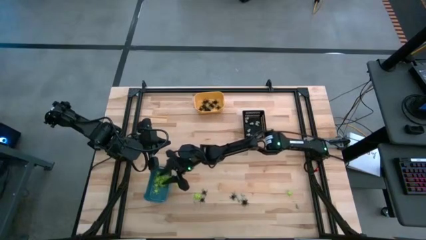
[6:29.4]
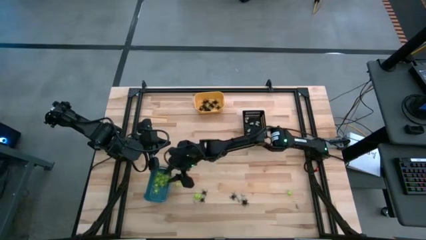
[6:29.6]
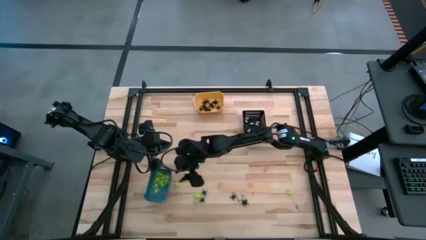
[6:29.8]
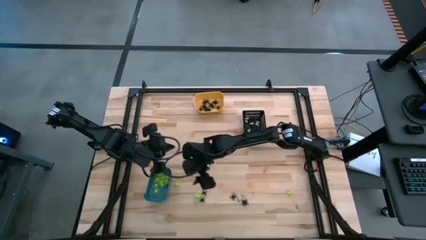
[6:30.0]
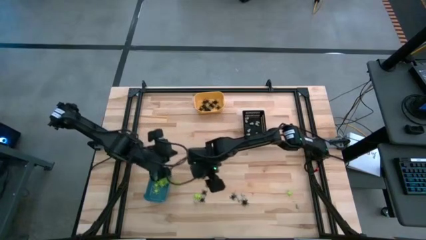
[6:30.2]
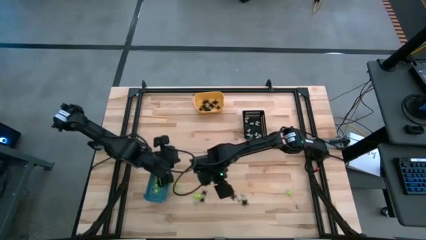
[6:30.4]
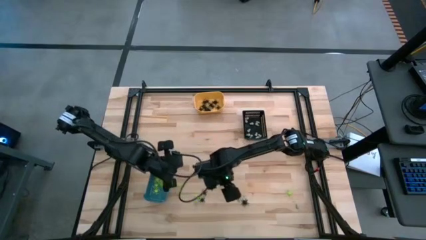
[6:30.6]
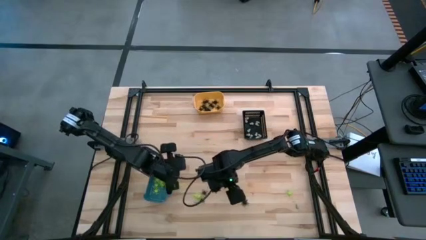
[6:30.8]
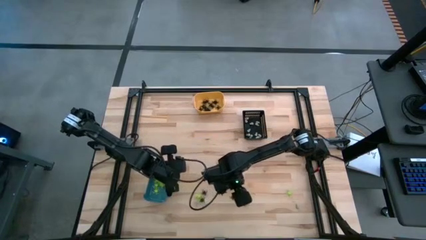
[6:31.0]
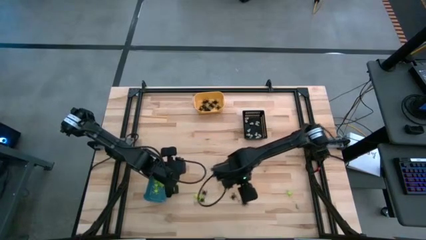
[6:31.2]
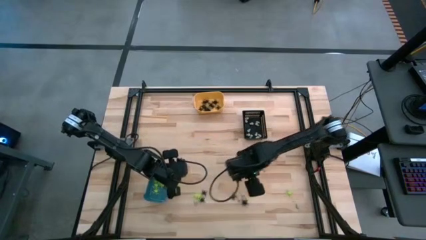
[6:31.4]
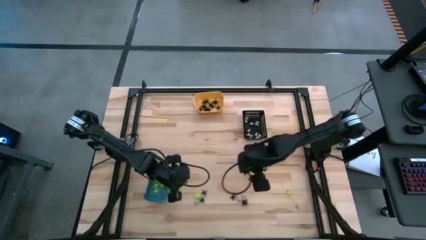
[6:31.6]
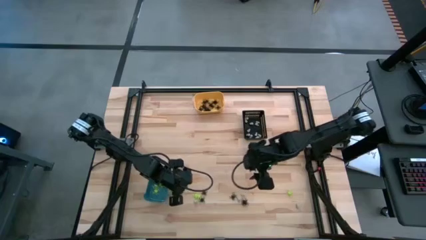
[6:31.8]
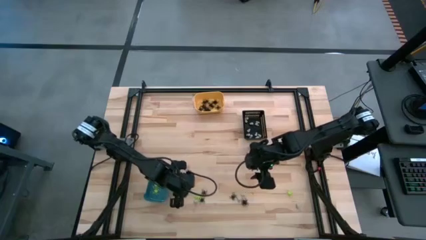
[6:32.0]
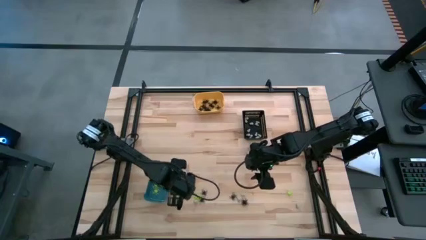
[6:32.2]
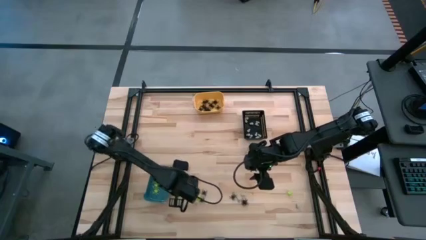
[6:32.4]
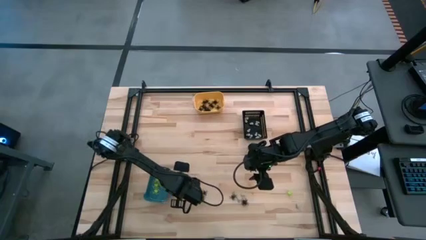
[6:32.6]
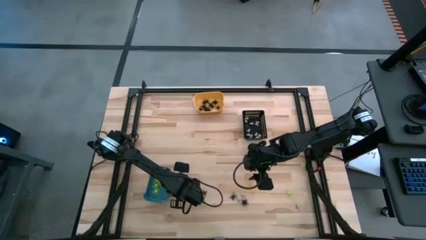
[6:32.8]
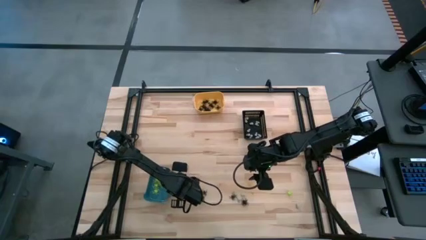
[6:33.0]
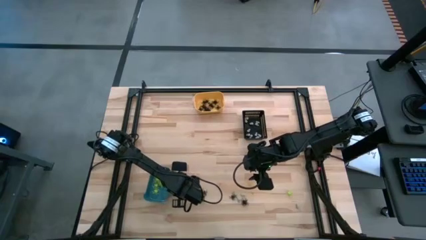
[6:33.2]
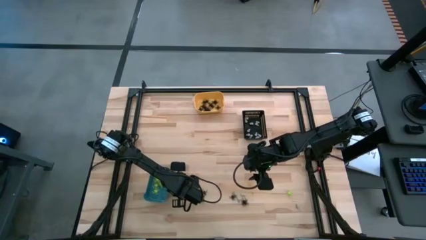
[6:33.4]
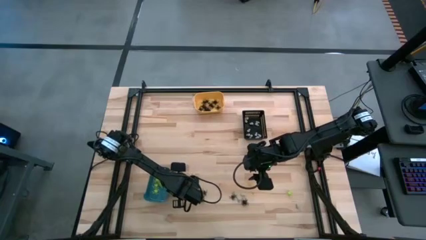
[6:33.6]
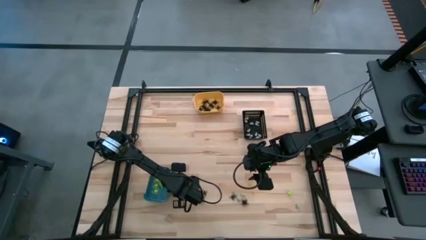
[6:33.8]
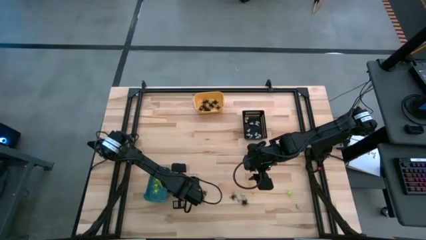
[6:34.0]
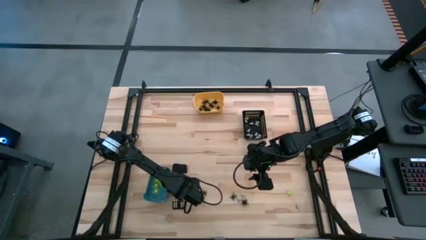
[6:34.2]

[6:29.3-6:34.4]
Task: Sort Halloween decoration
Put the green spider toy into the blue bin

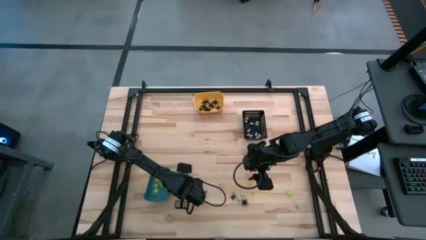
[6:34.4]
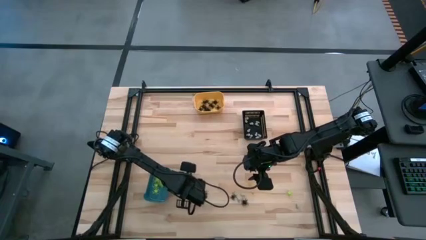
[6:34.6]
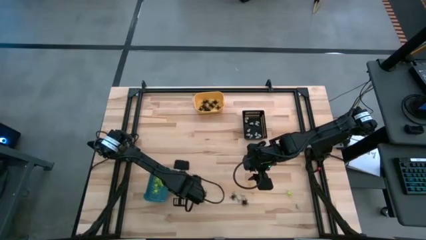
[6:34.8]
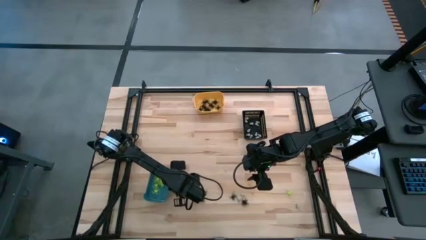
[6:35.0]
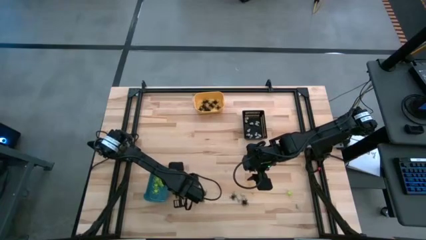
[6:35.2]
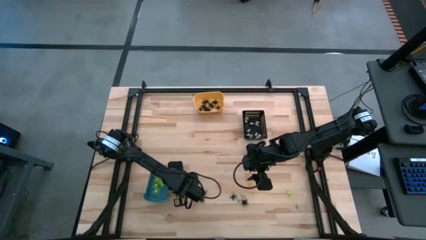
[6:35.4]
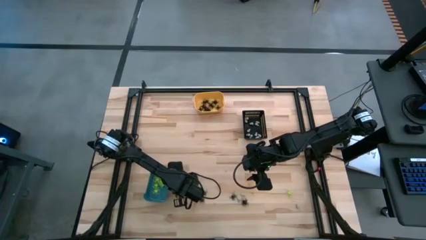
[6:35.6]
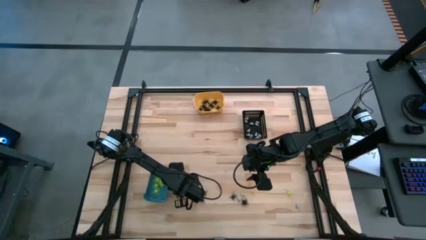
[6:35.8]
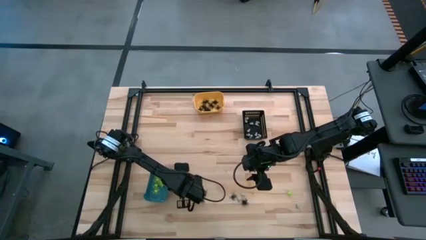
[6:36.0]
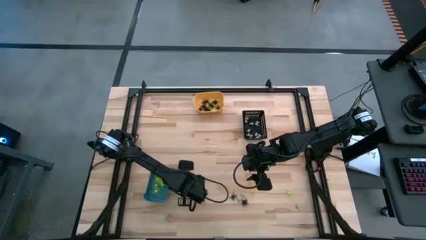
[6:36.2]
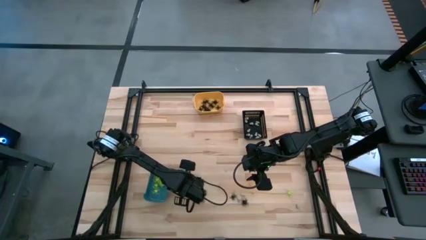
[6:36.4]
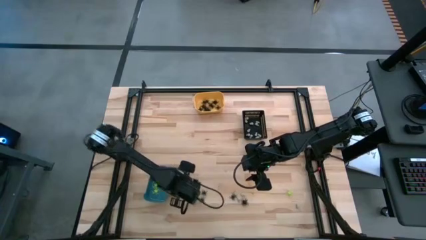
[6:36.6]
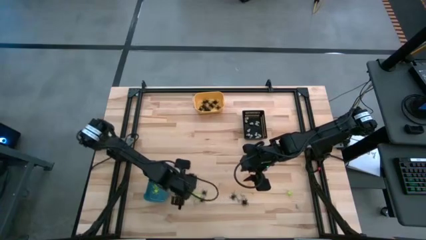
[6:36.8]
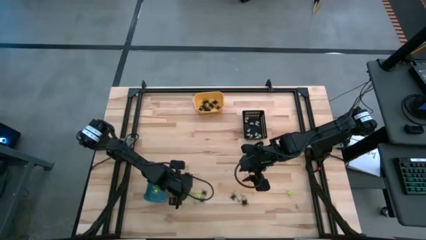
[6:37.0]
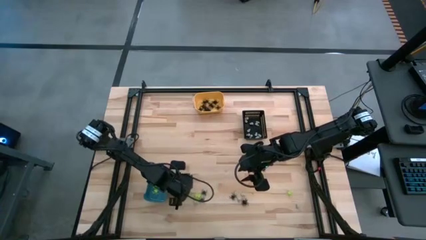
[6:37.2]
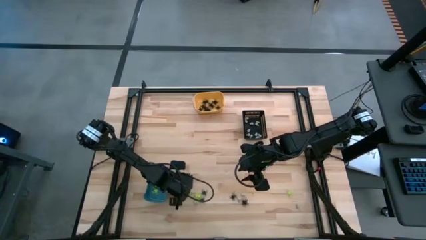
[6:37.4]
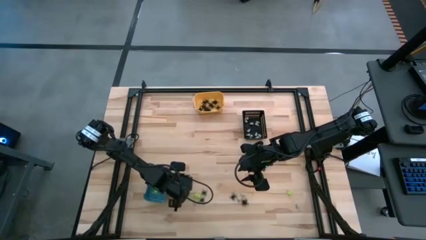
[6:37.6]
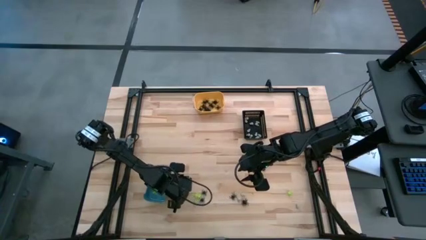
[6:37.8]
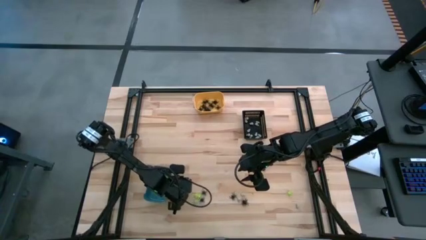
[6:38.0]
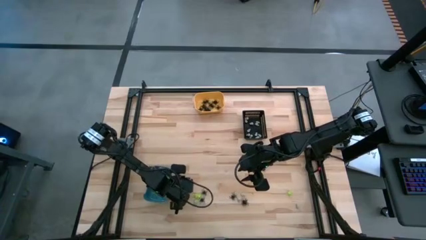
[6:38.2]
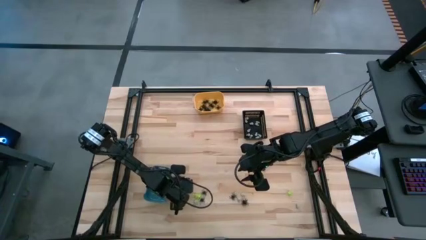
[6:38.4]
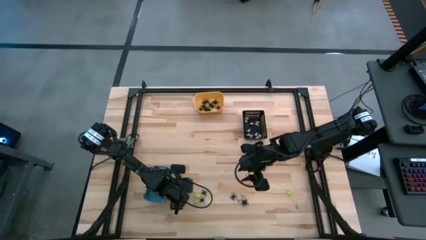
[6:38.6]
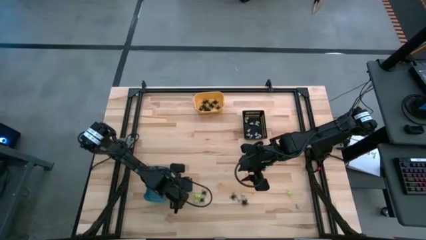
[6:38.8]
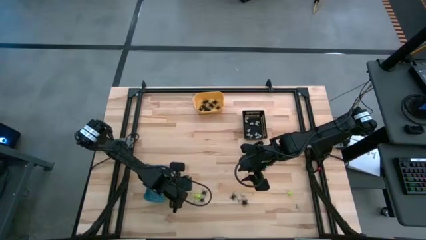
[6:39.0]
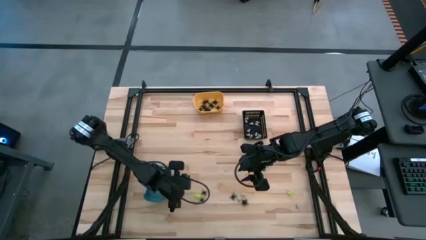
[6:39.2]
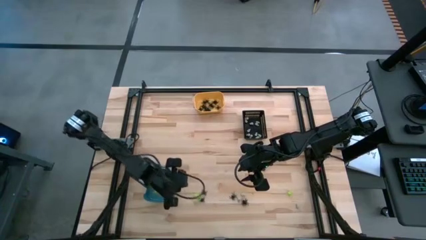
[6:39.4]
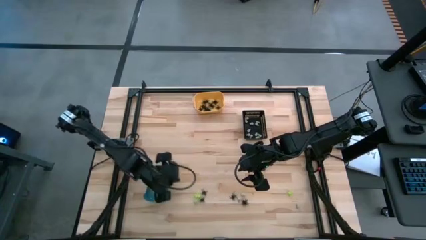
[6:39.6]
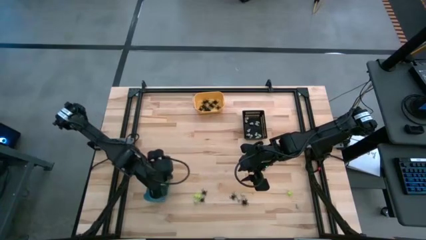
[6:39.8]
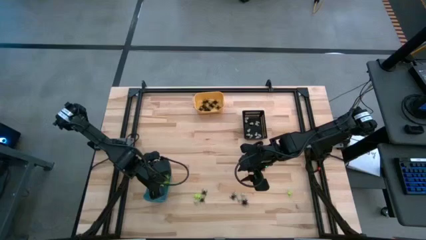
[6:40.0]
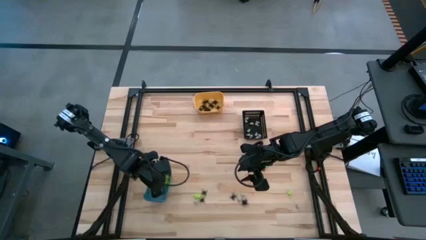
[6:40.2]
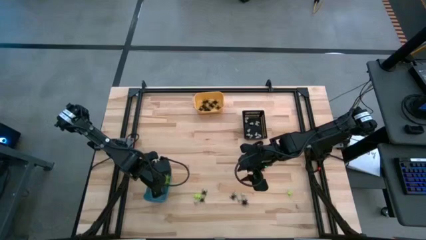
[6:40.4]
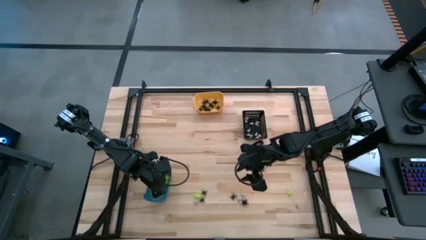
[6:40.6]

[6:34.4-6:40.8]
Put the green spider toy into the blue bin

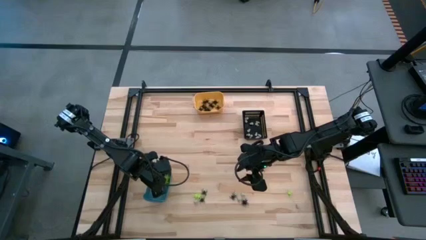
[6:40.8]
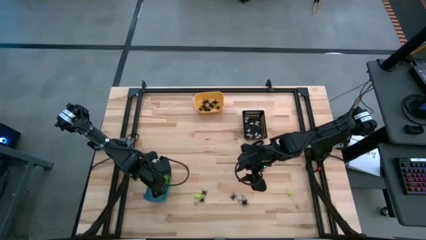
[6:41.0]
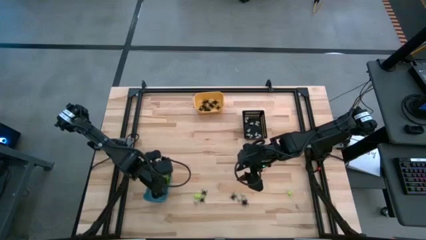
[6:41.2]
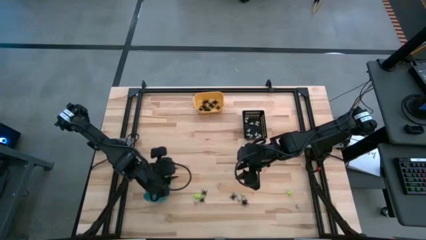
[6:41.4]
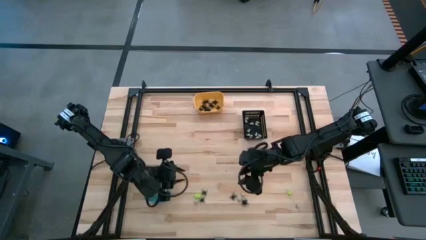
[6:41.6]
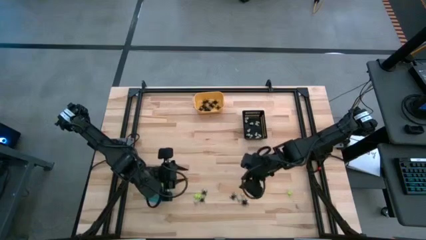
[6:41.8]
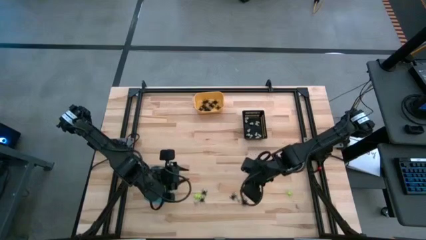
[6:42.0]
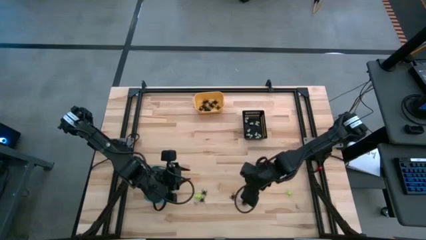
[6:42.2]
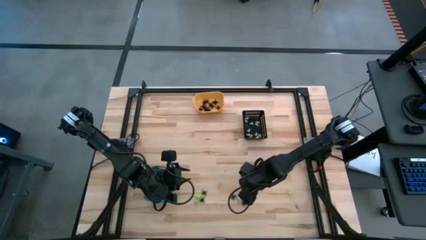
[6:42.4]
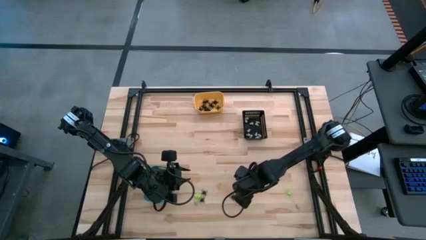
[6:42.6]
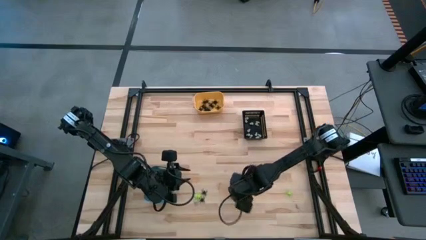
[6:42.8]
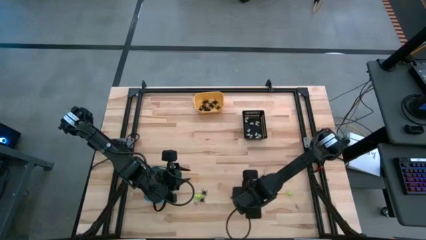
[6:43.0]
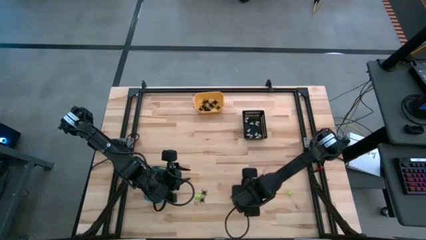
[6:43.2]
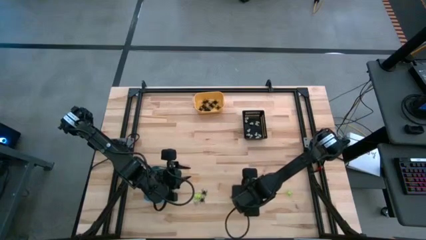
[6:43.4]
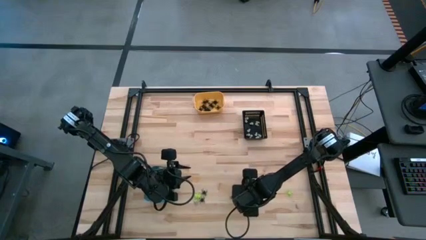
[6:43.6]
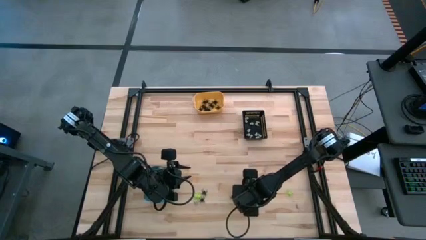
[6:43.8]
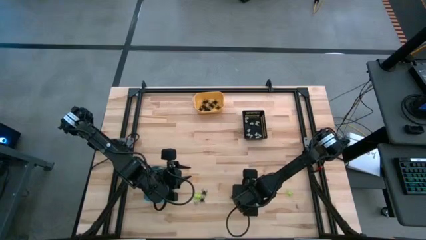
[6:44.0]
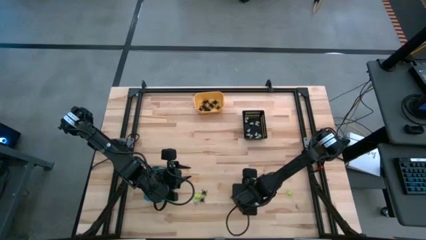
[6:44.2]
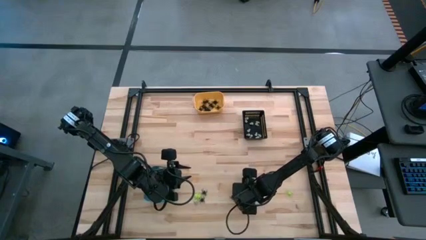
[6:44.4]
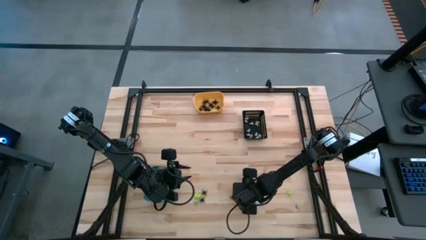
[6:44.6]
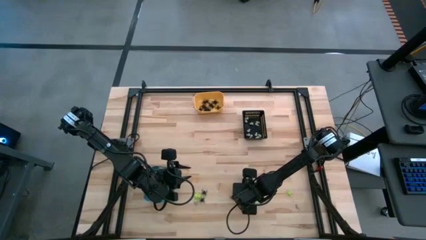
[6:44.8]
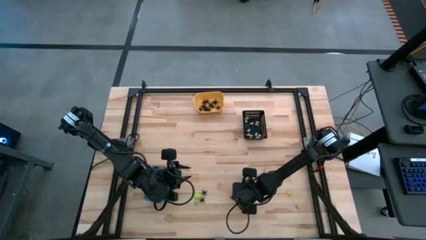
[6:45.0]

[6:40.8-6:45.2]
Put the white skull toy into the black bin

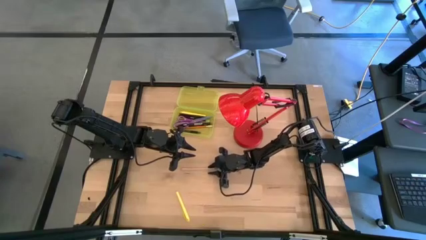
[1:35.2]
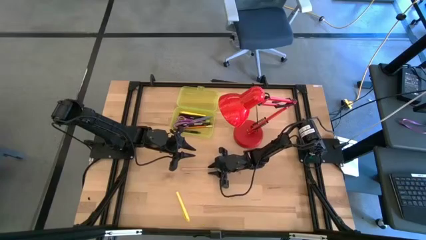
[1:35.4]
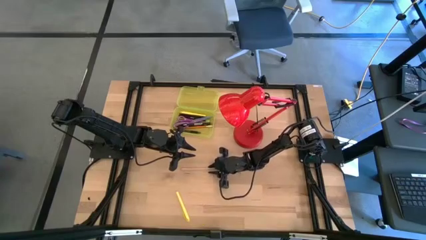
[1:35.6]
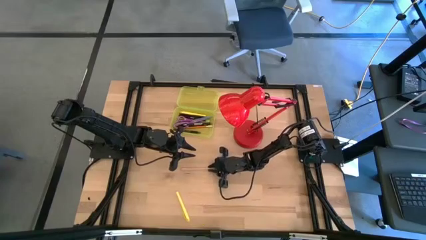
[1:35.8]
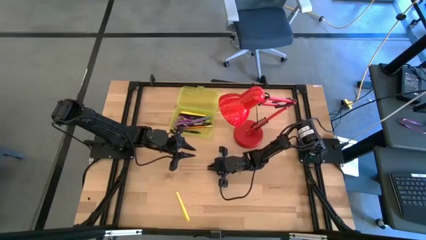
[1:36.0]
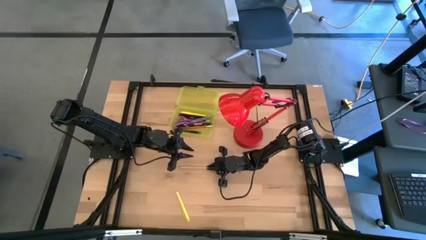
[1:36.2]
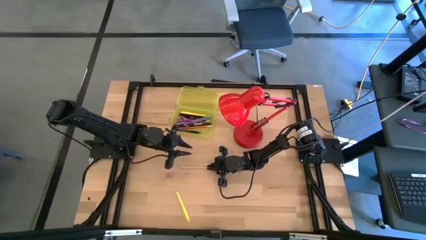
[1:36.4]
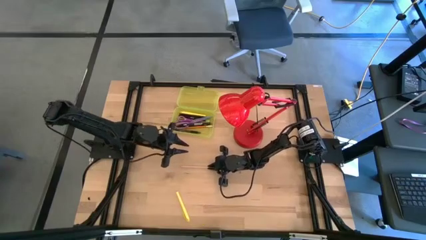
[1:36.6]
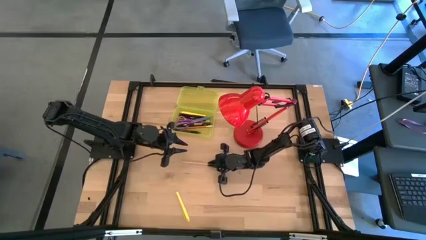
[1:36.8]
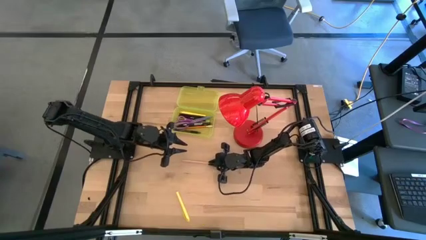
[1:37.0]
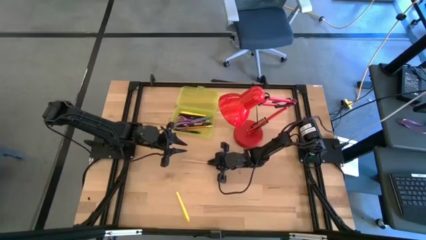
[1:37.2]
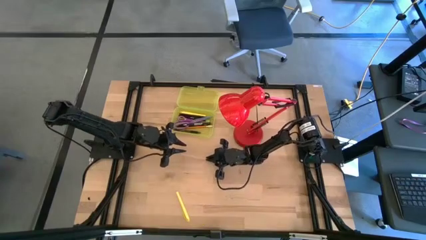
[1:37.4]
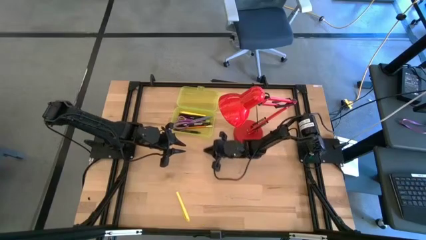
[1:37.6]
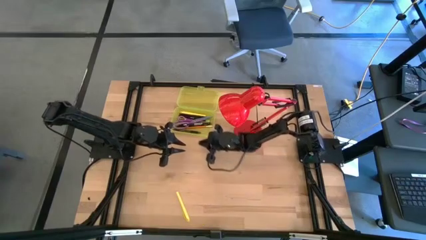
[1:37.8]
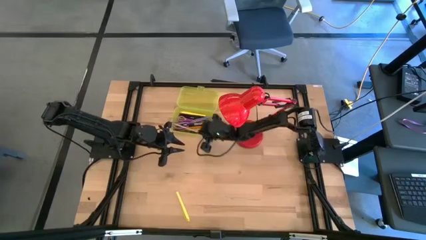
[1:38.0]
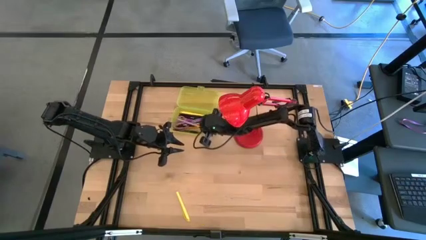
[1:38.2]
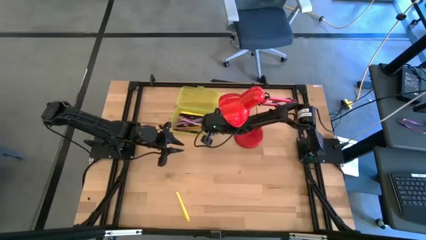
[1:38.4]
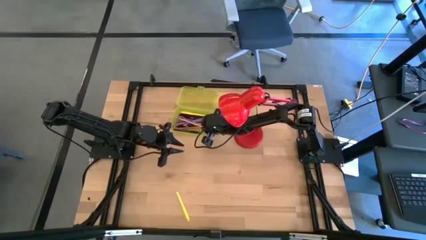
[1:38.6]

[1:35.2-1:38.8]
Task: Pick & place school supplies into a supply box
Put the pink pencil into the yellow supply box
